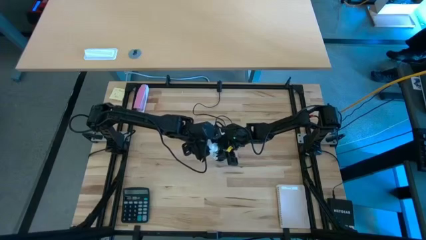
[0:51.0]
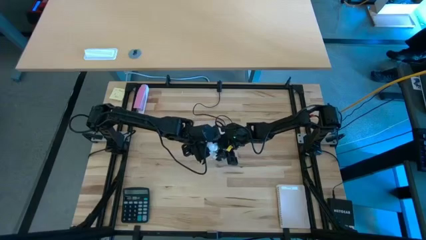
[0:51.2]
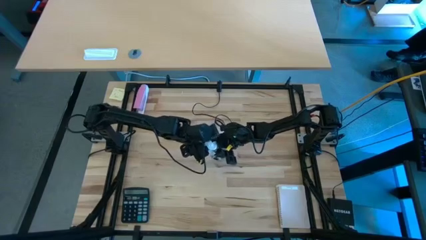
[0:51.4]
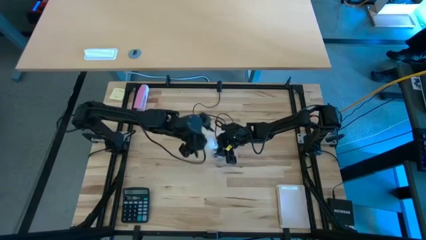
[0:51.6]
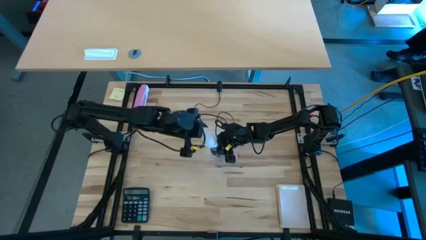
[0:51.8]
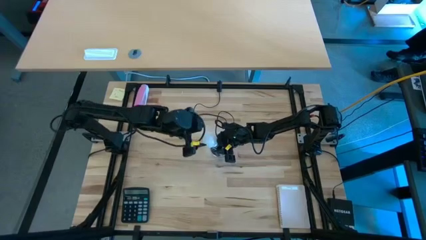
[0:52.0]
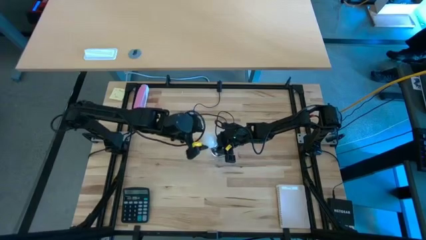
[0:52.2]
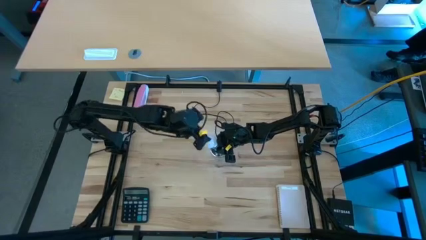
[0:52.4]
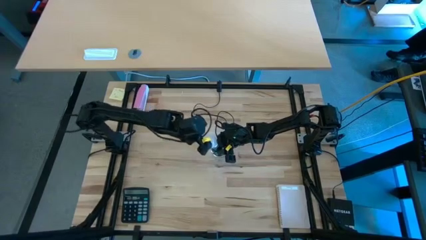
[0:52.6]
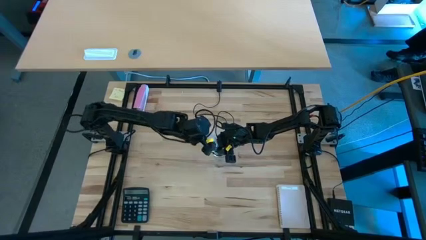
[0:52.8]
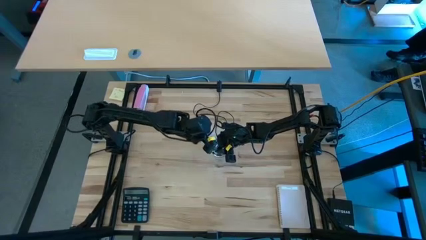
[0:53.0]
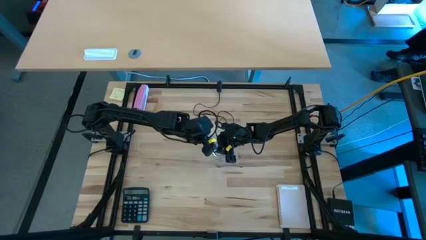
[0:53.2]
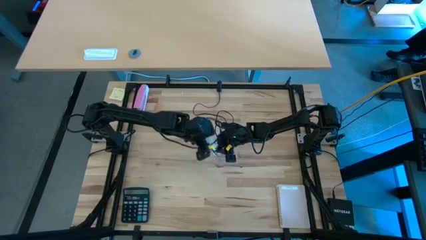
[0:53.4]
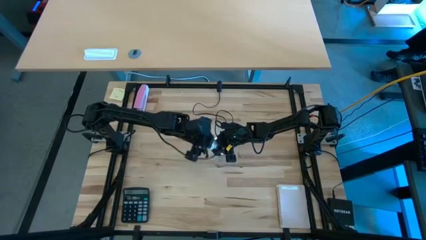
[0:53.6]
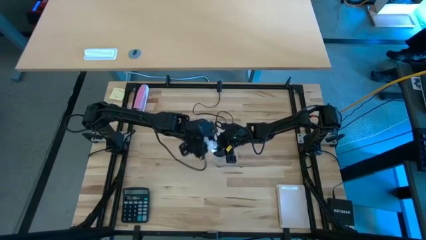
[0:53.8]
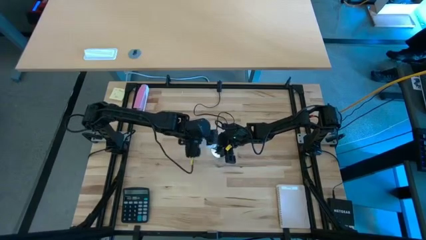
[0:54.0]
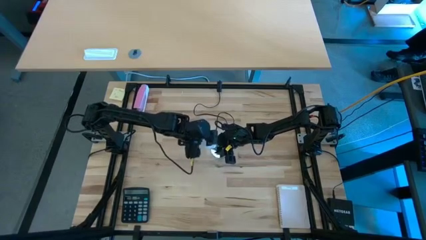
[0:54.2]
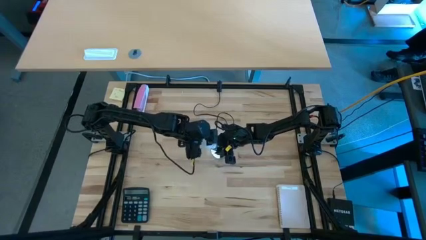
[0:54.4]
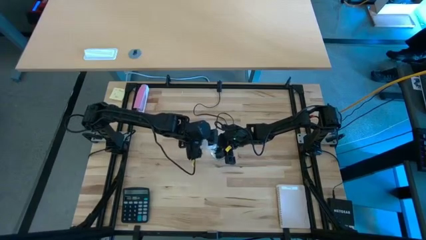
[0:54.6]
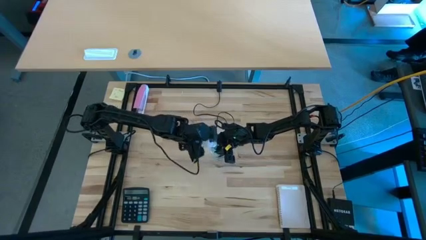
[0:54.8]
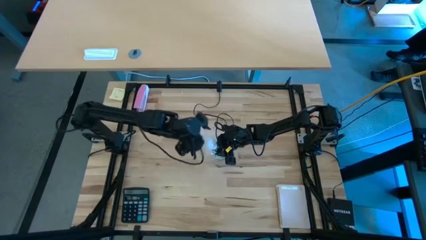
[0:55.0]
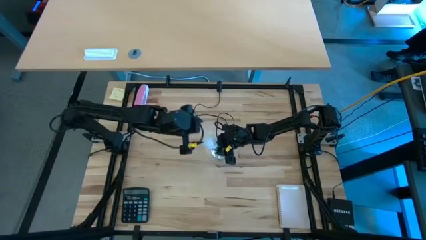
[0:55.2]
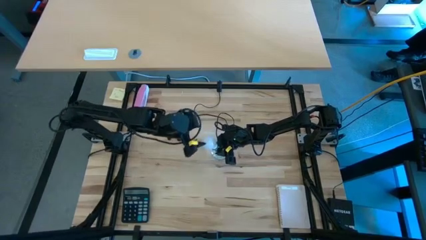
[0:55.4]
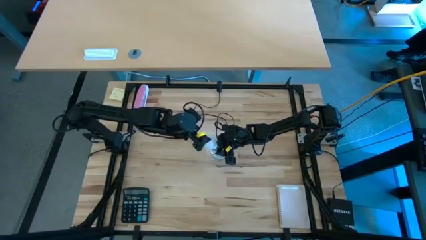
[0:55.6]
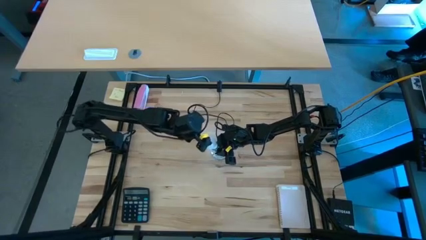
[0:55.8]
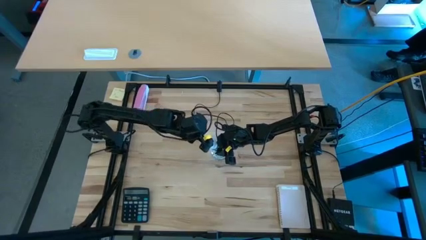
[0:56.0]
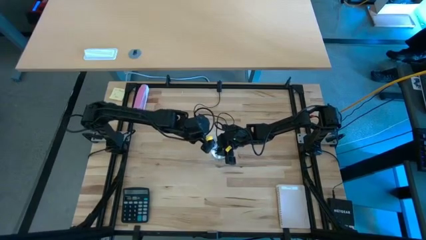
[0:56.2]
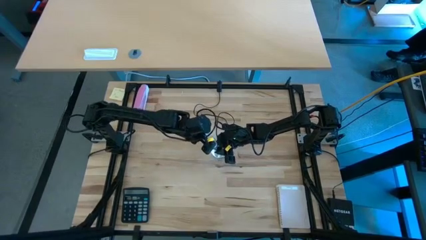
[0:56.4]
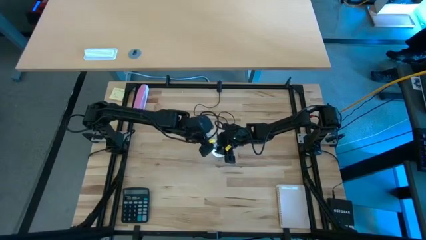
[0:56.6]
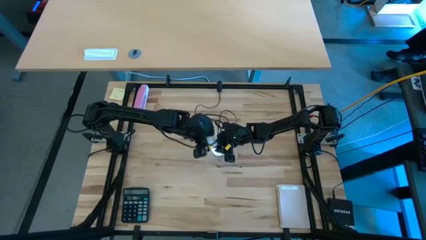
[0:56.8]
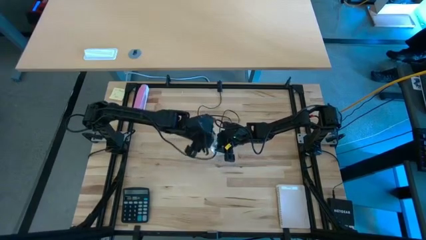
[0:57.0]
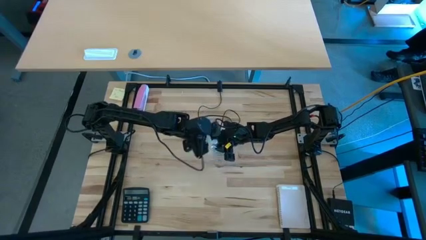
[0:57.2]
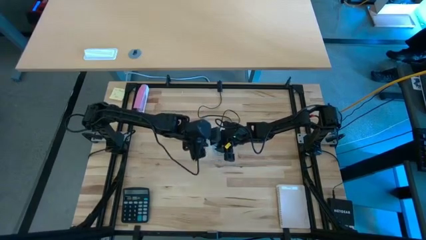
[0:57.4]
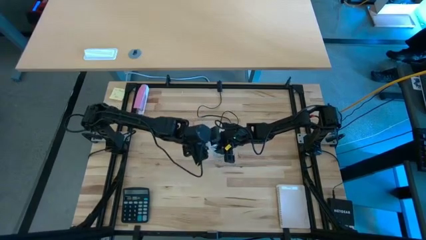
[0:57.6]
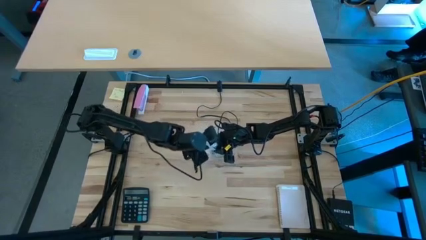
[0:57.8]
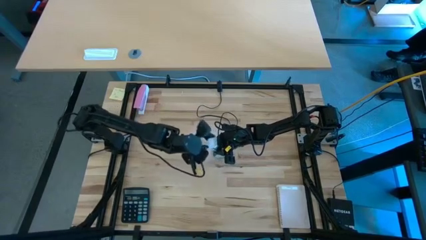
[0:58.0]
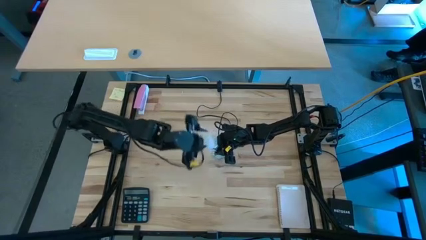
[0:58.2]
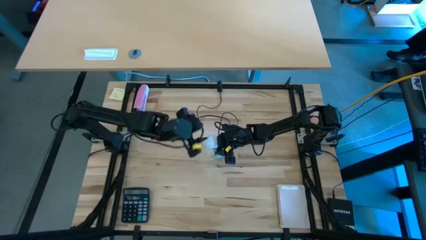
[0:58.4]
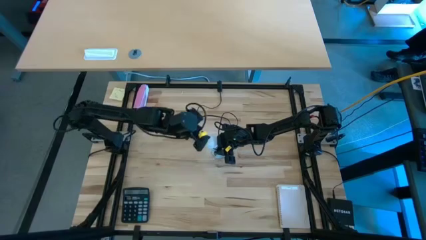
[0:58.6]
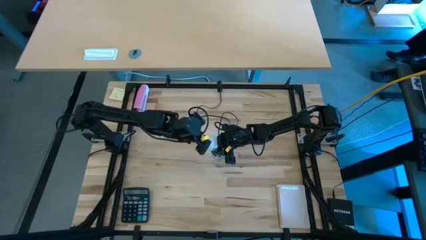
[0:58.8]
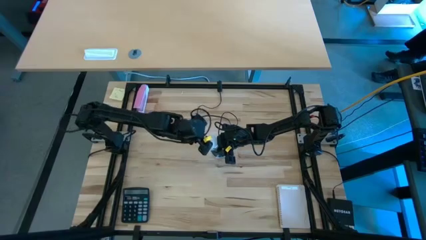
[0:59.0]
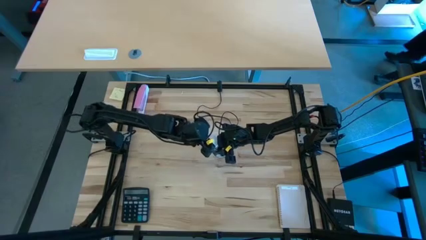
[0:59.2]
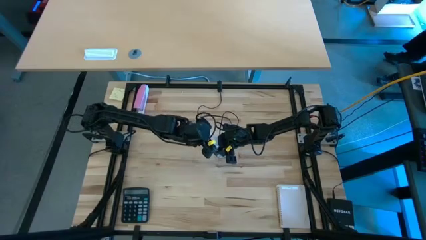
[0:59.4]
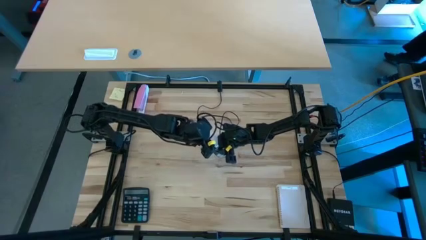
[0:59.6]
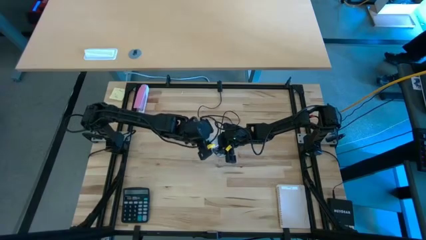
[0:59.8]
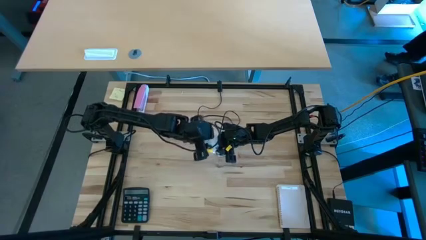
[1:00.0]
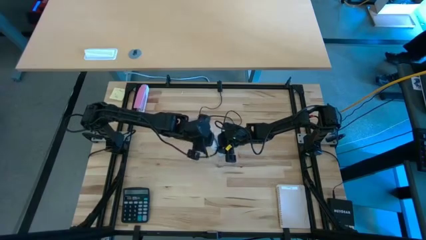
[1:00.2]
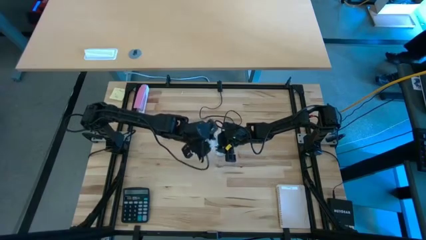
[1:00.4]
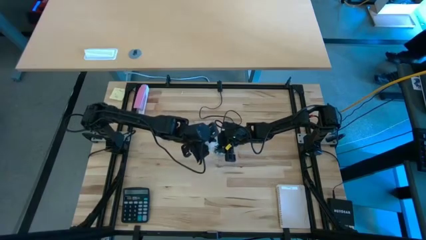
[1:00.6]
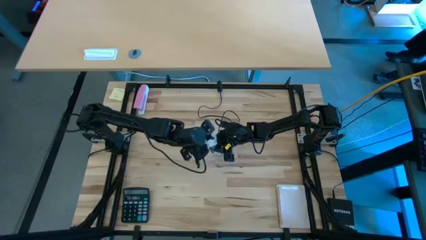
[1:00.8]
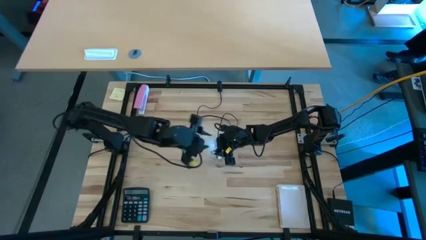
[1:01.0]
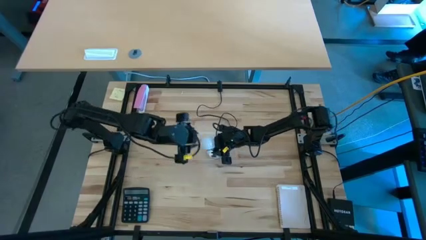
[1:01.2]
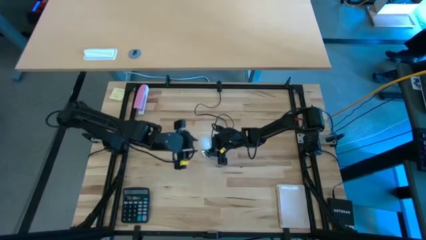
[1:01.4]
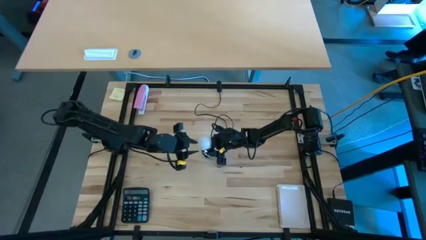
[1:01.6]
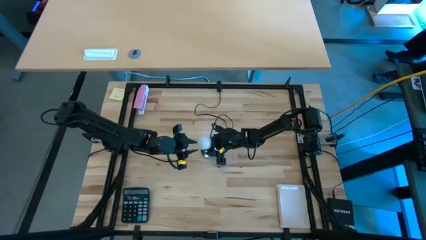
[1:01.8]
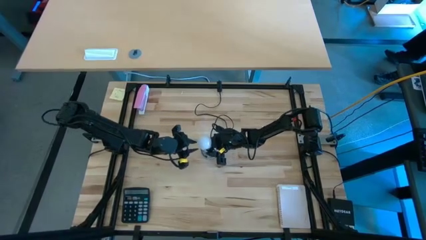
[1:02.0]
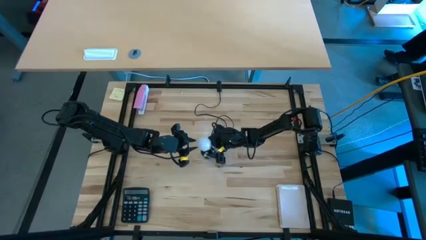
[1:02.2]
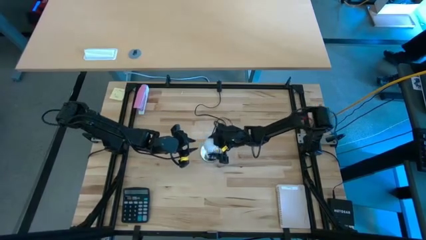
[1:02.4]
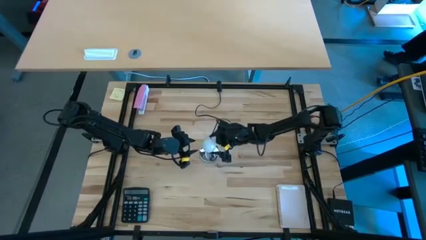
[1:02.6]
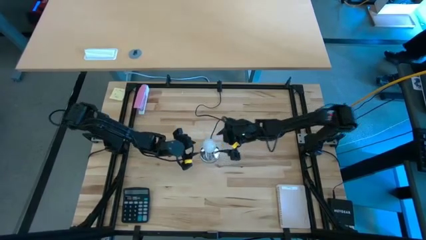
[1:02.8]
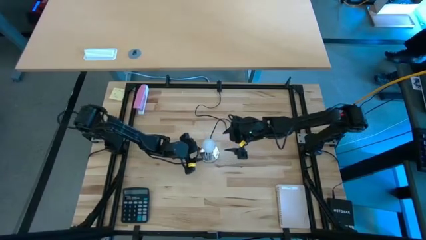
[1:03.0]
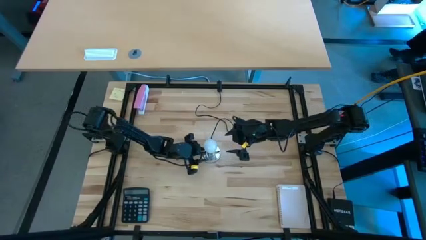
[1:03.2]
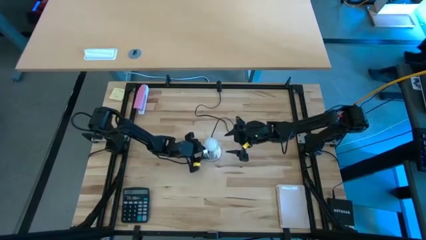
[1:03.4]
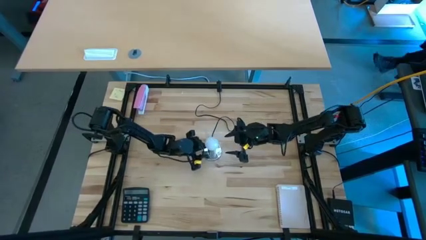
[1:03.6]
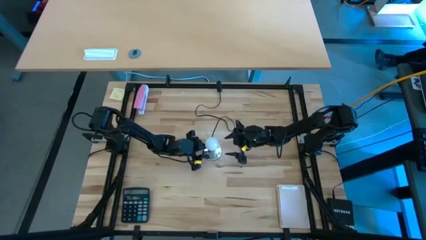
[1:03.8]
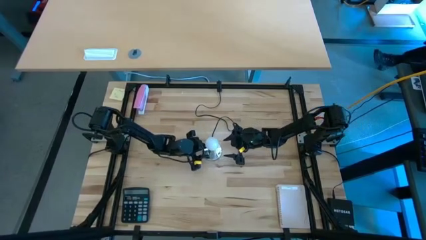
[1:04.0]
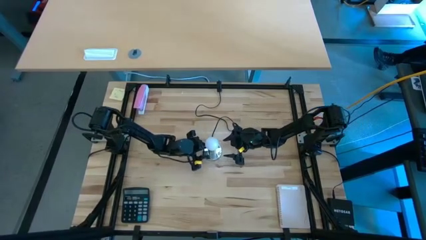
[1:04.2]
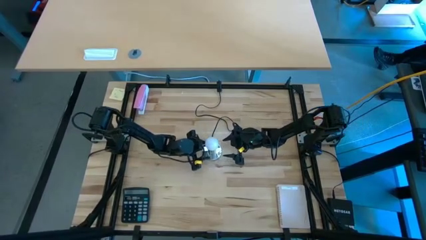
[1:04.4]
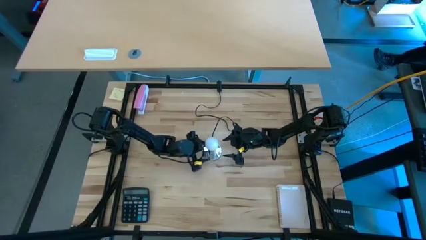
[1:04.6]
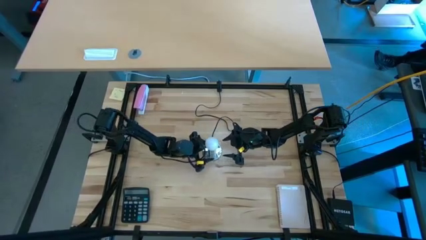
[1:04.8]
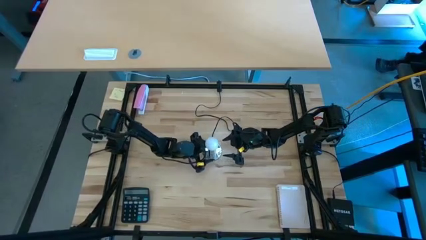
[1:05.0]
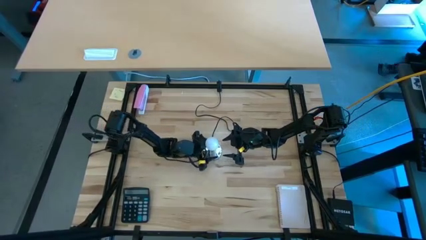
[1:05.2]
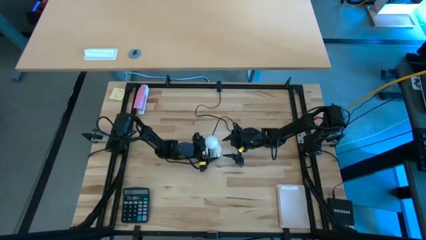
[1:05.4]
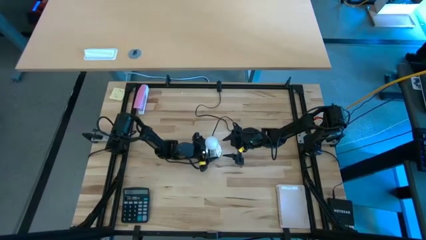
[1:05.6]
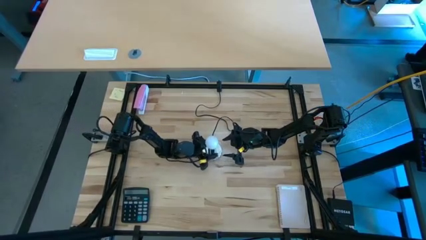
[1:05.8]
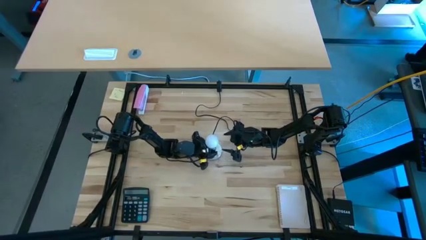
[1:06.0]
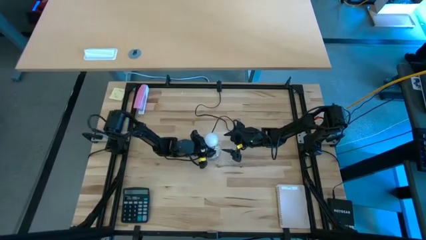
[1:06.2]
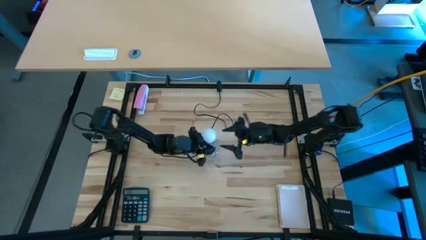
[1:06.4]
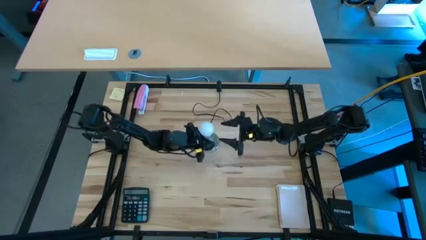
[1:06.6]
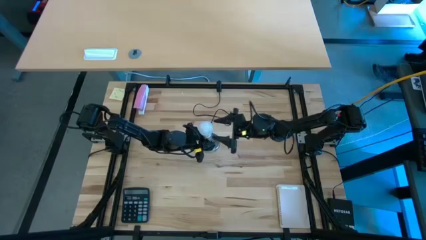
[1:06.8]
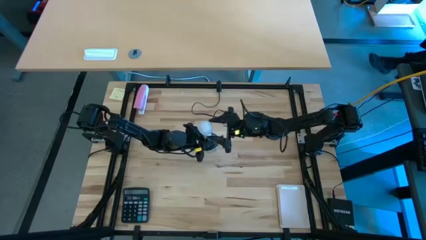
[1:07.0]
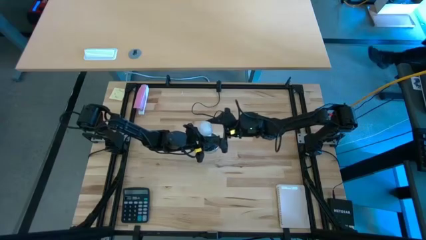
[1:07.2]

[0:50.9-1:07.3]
Task: Screw lightbulb
Insert the lightbulb into the lamp
